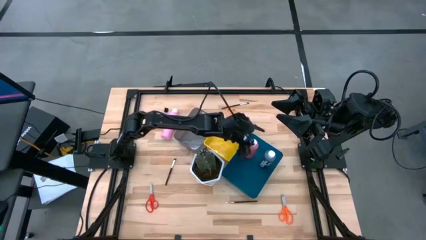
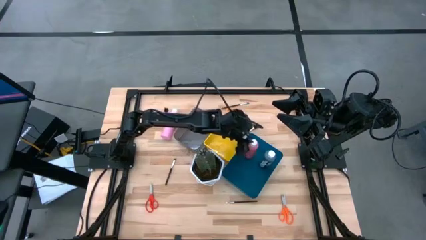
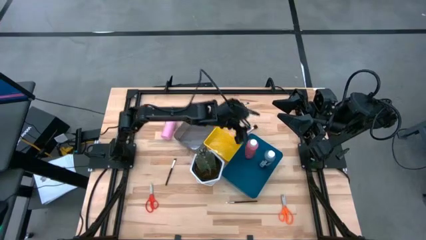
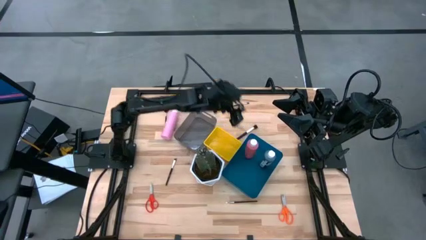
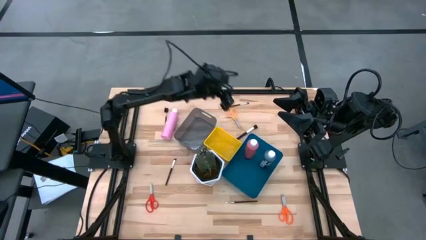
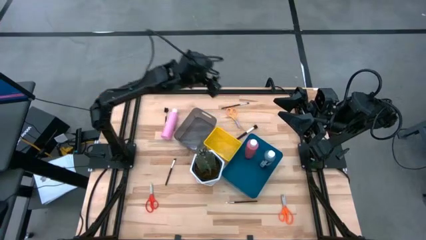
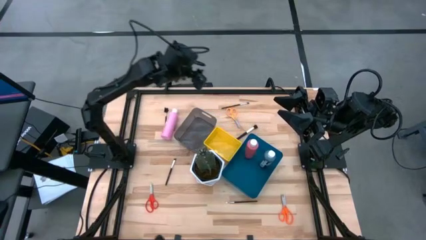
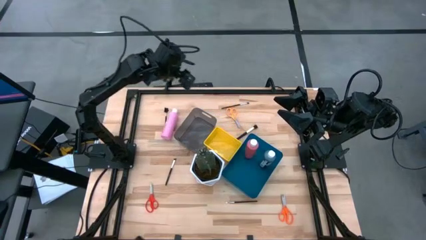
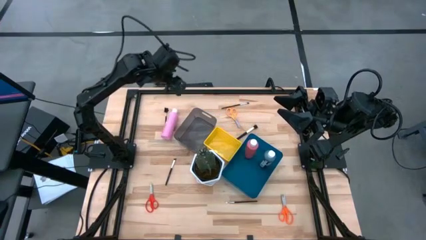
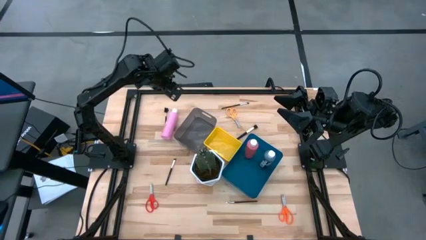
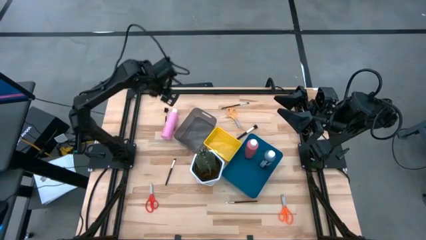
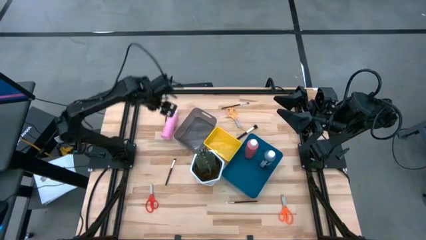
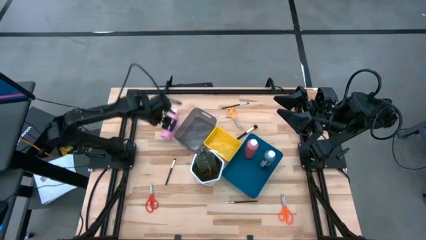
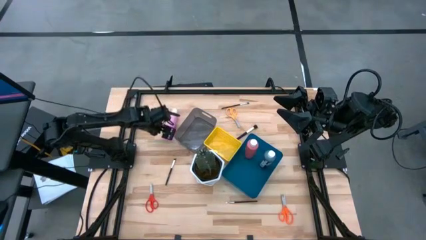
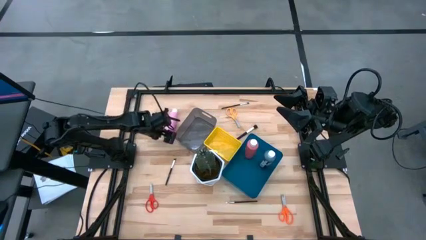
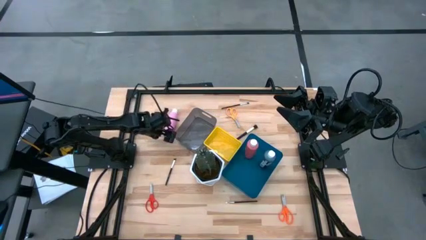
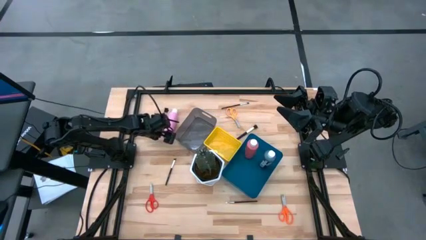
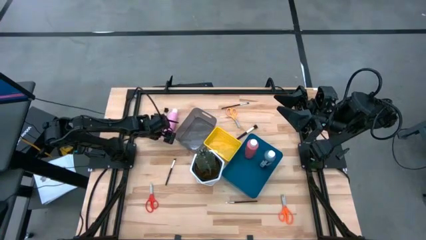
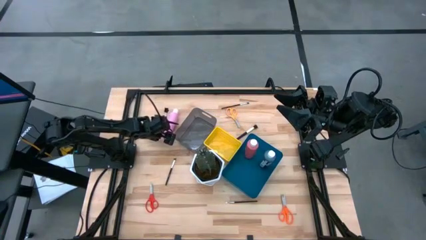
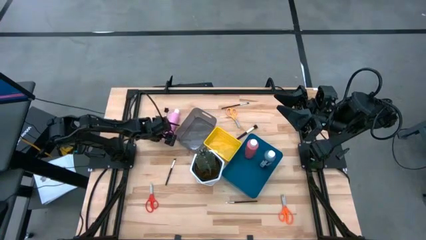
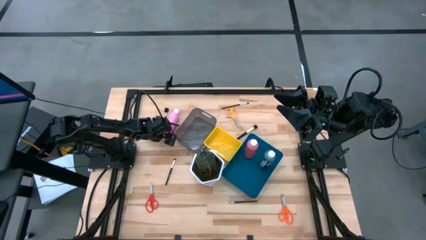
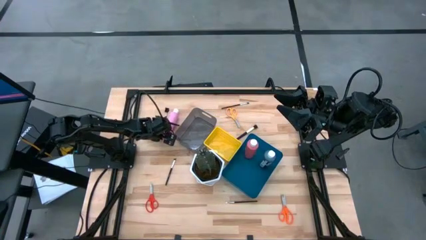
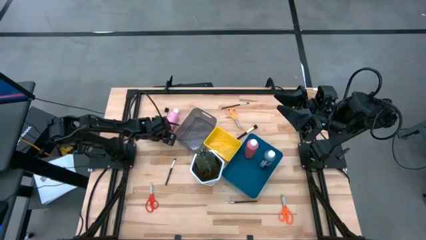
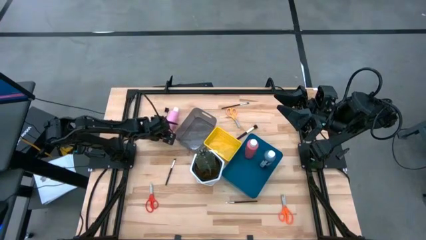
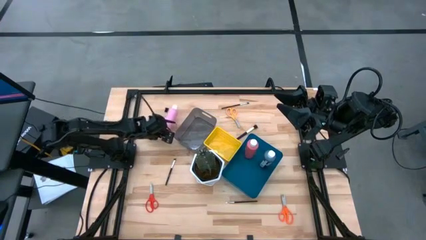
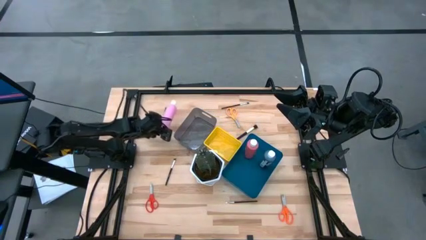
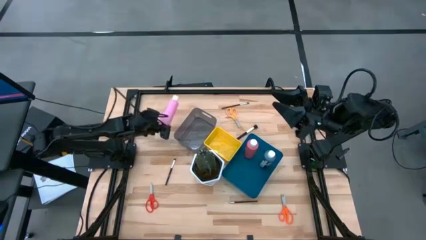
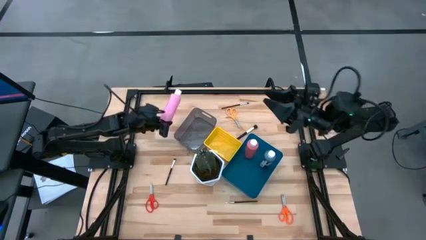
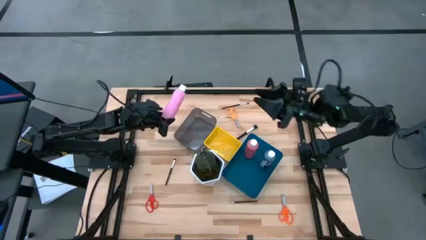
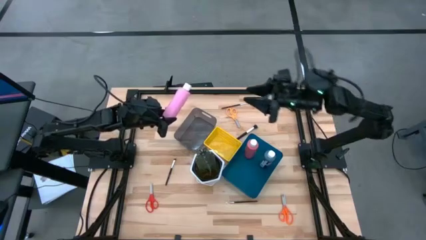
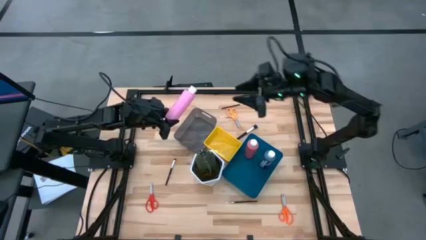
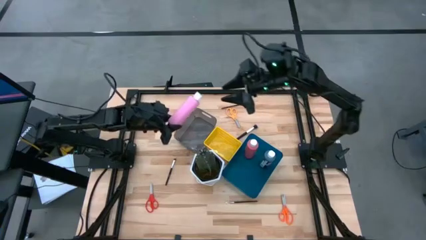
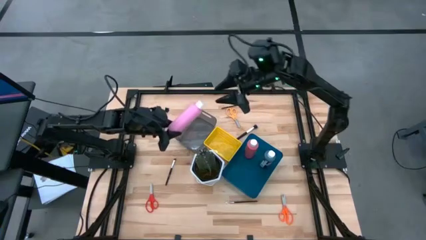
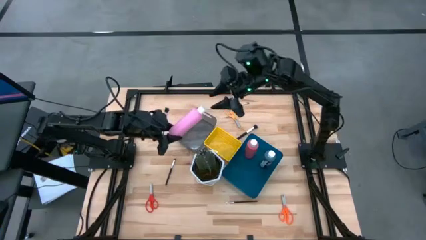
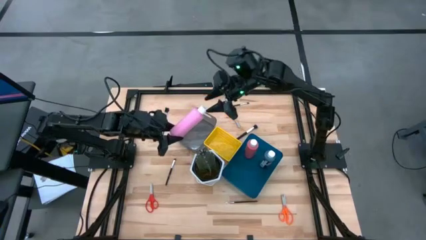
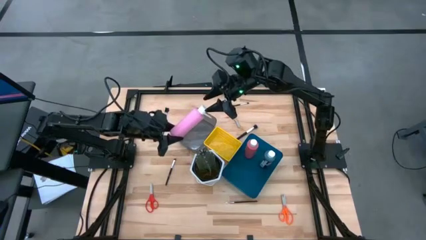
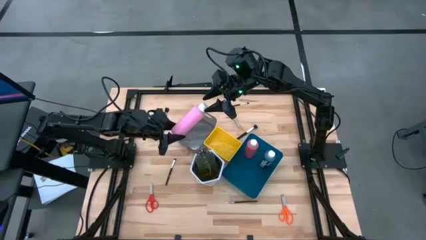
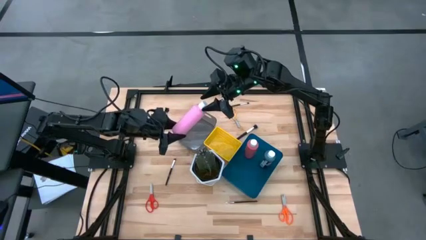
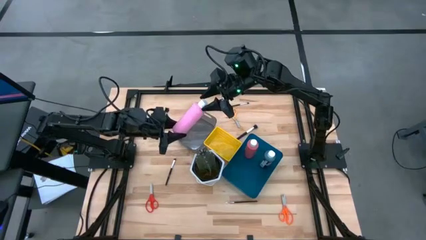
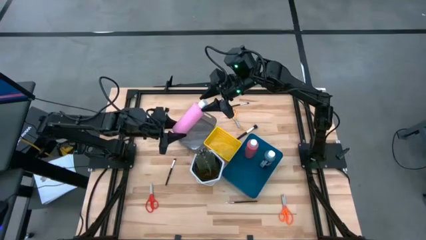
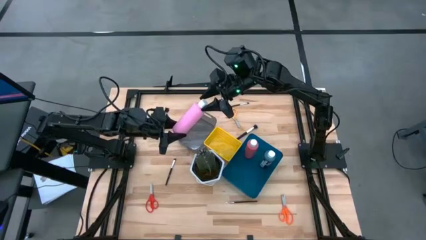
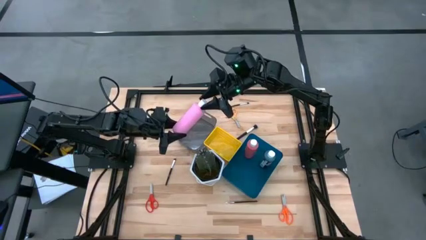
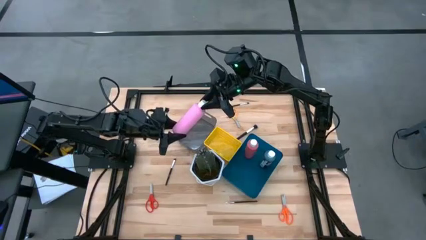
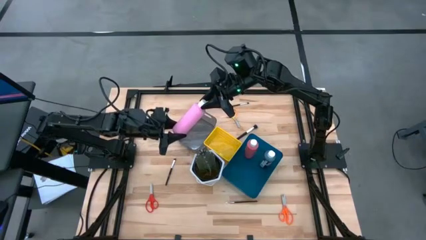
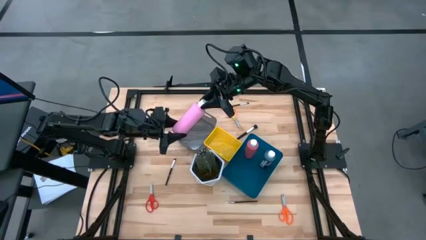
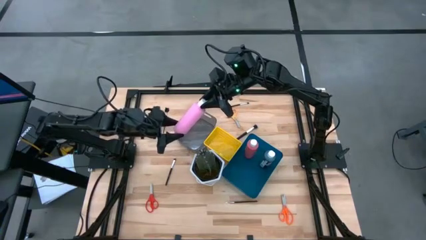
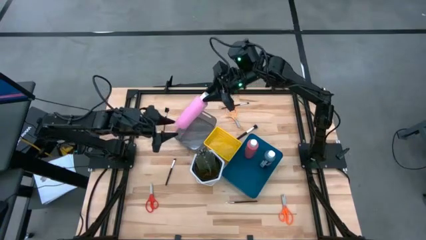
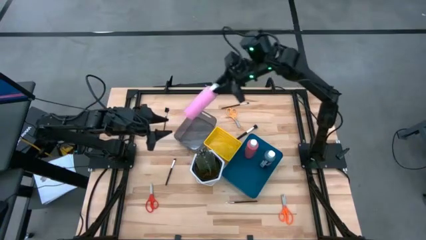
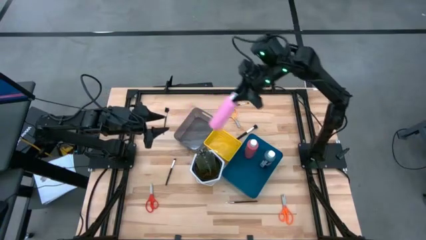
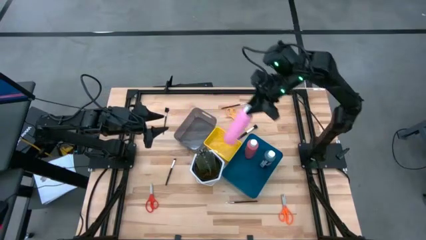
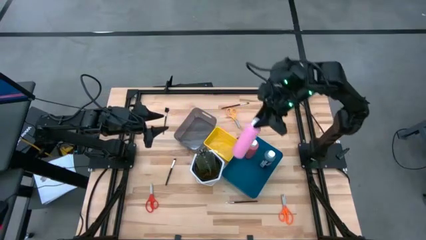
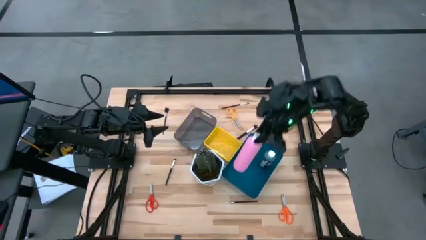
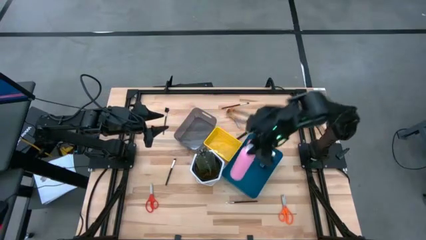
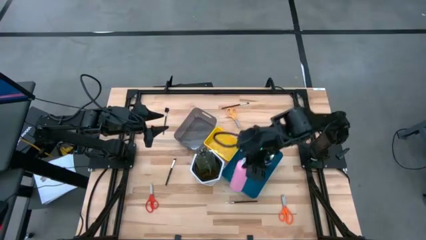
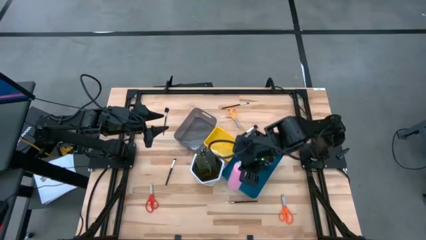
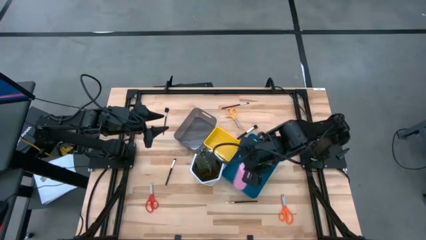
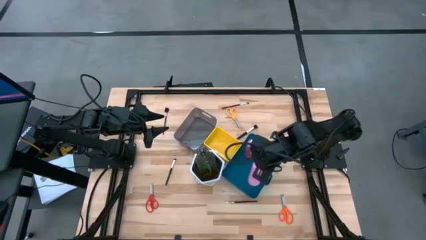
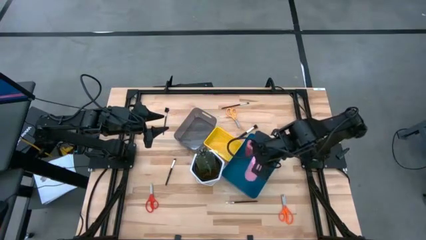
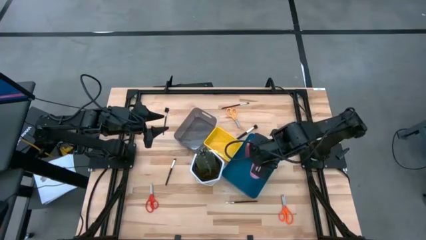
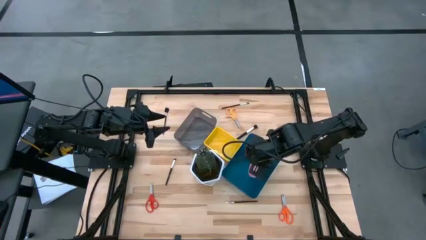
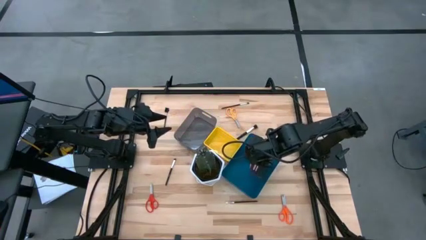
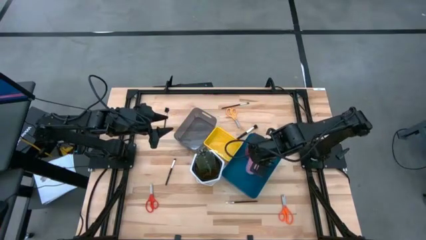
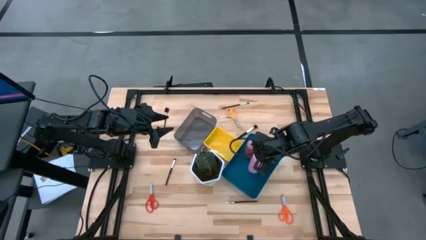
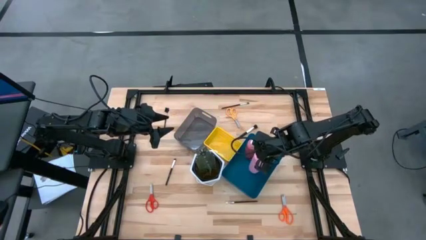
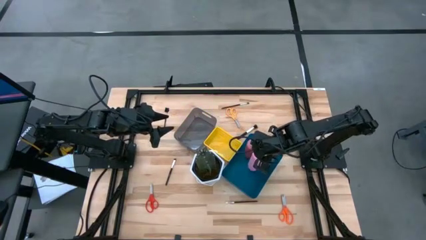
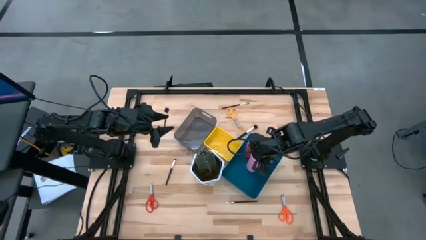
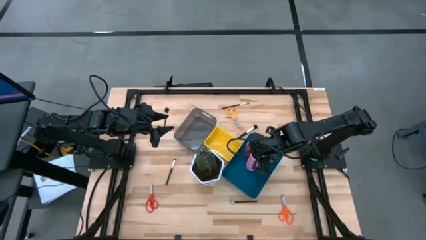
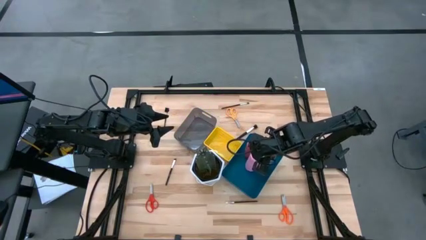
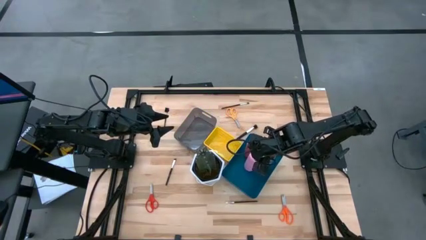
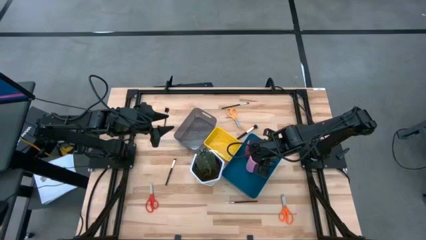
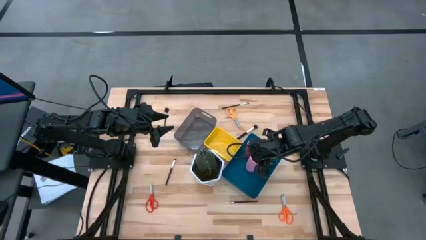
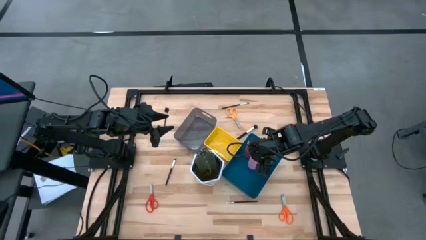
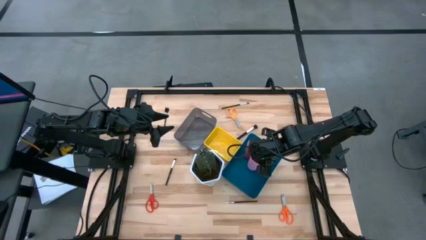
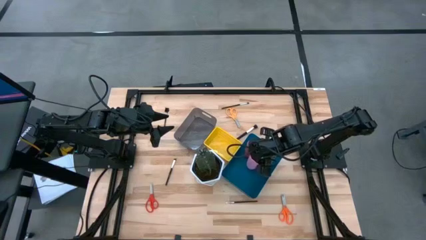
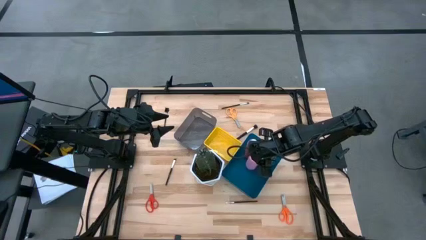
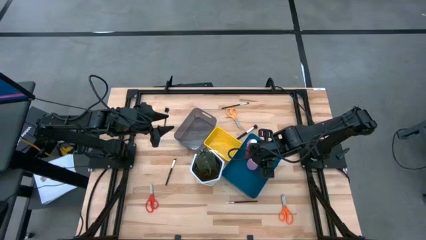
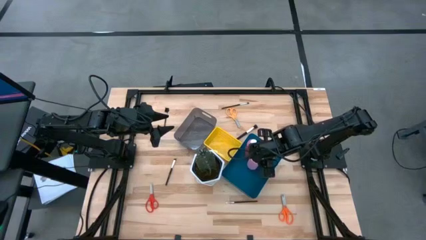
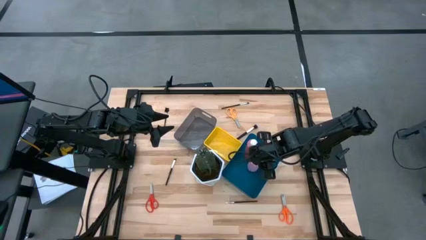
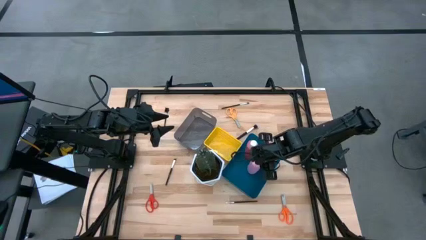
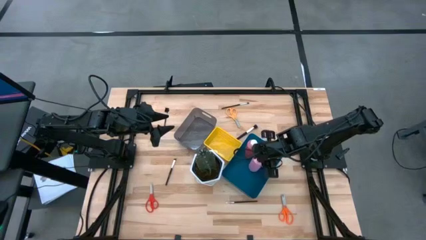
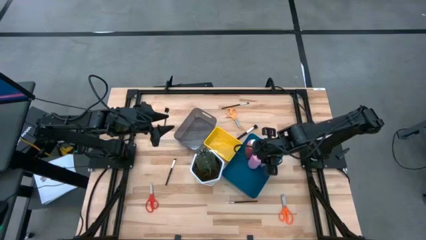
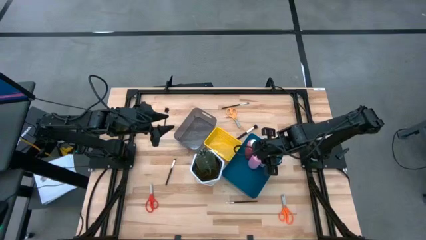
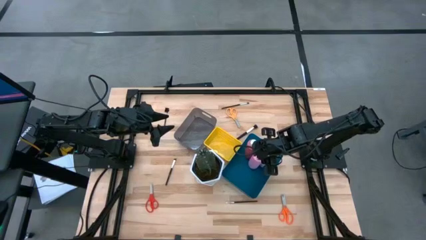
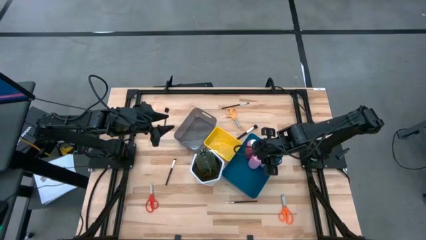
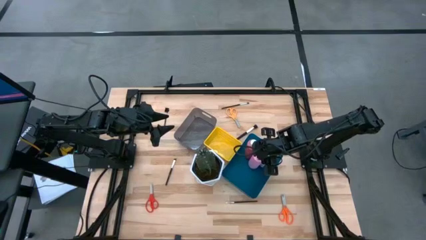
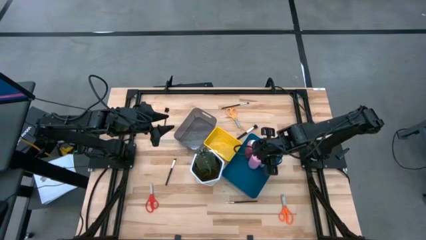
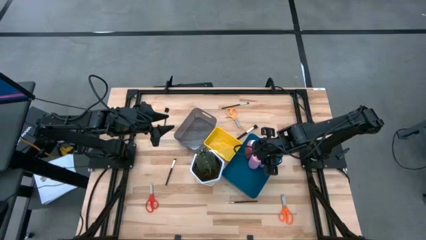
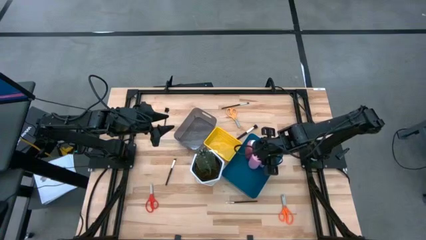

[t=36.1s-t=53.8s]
Task: Pick & Place Paint Supplies
Put the pink paint bottle into the blue bin
